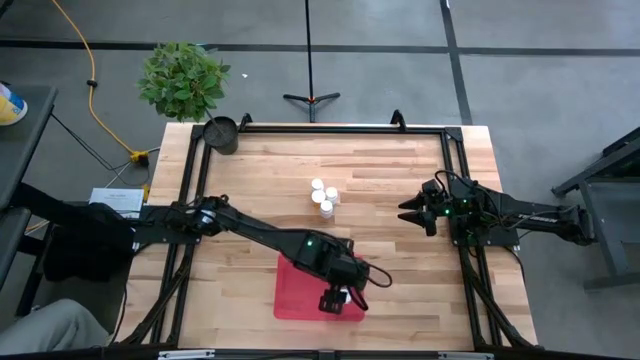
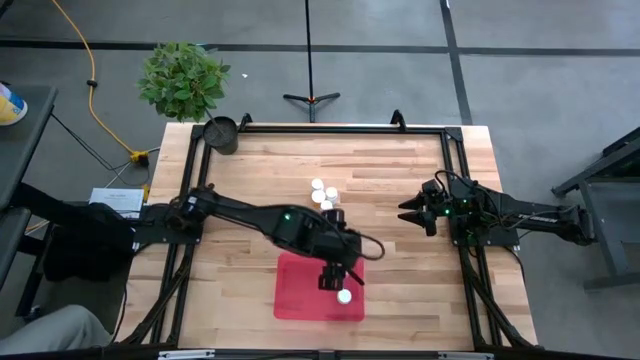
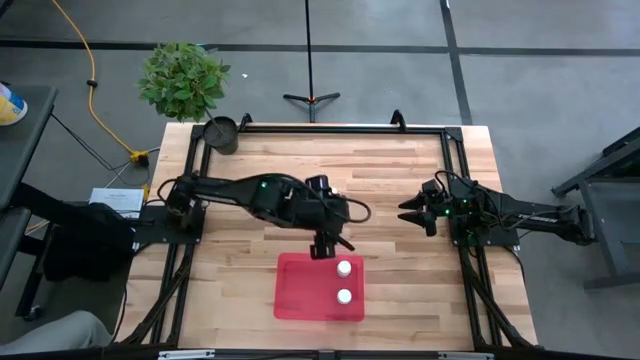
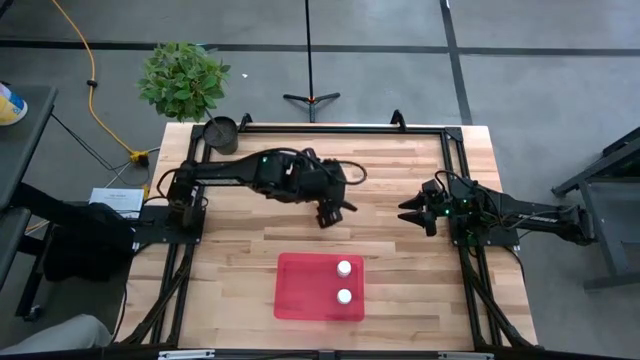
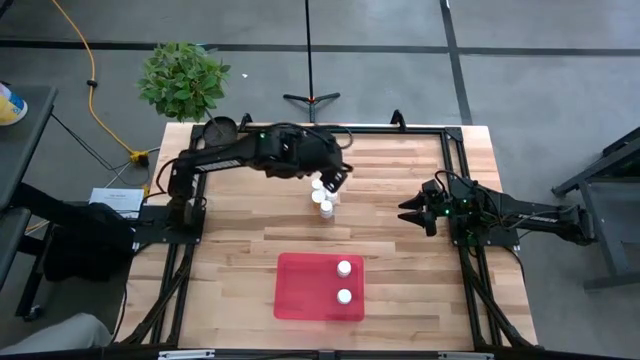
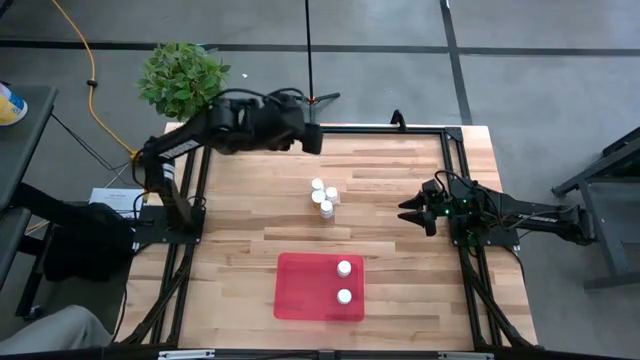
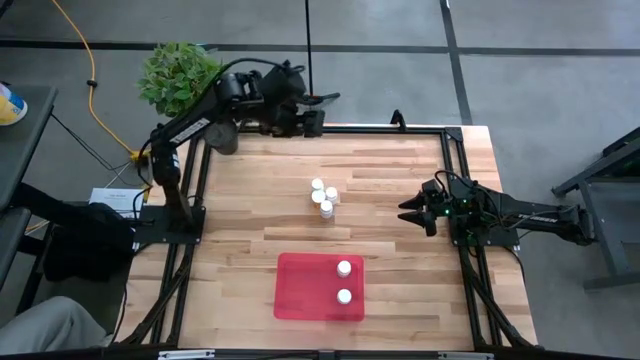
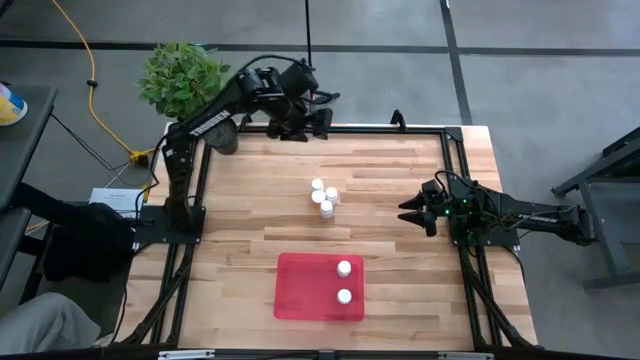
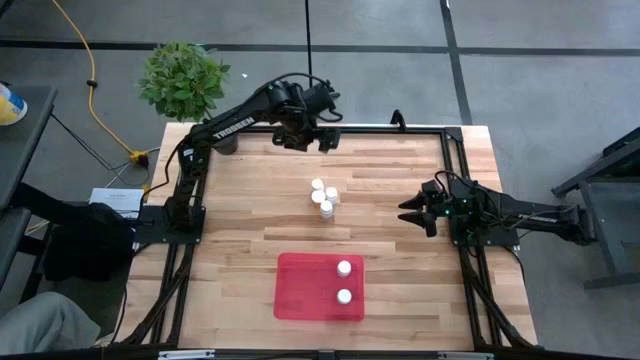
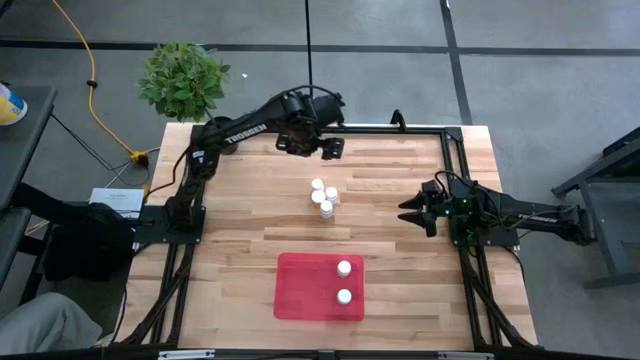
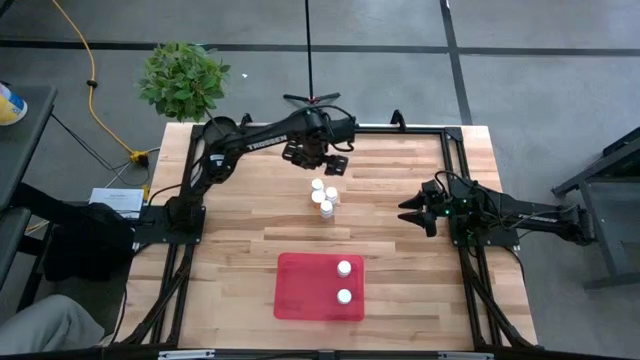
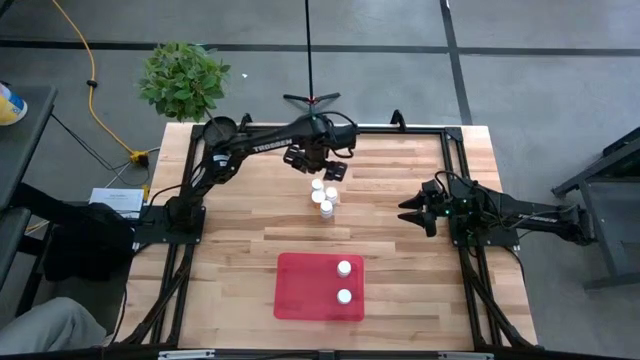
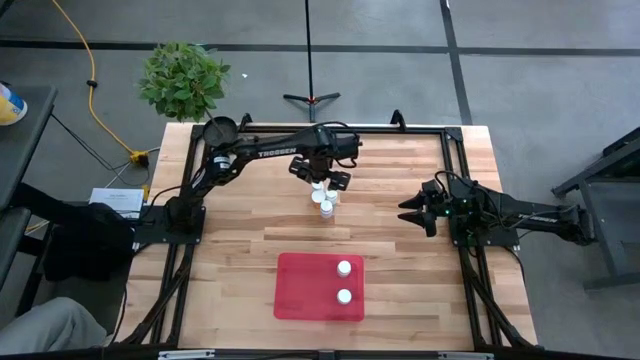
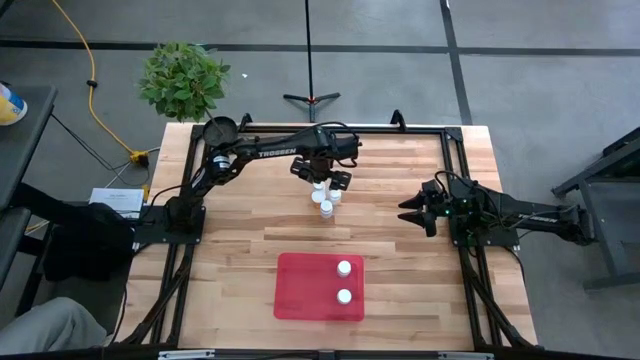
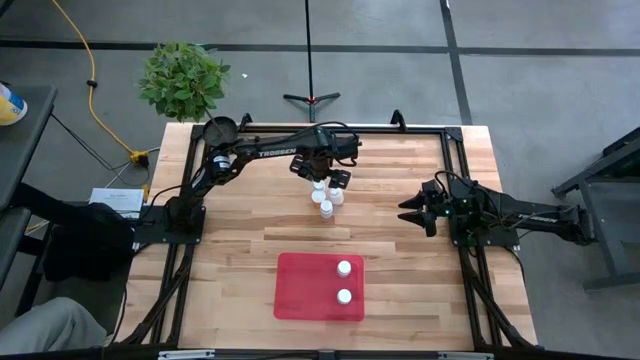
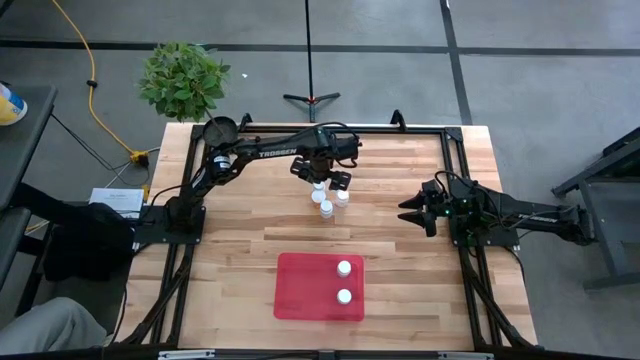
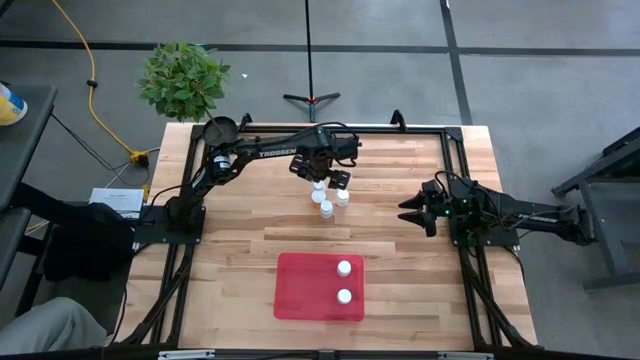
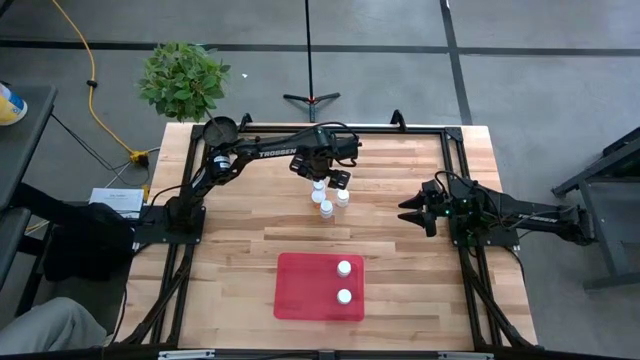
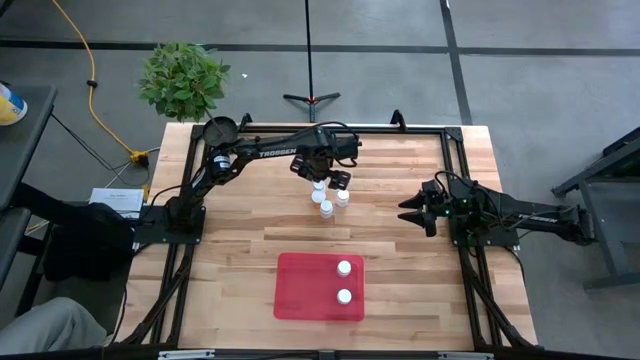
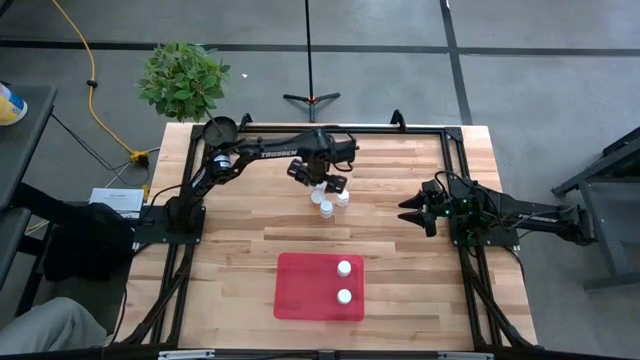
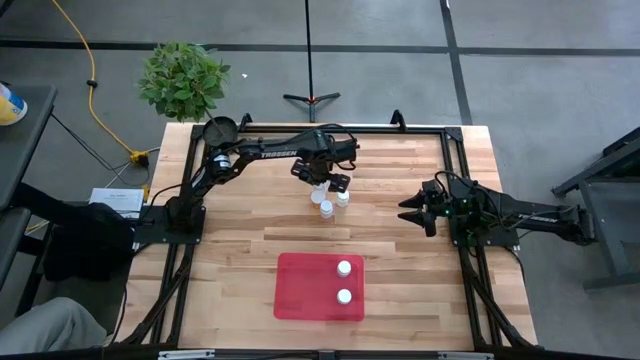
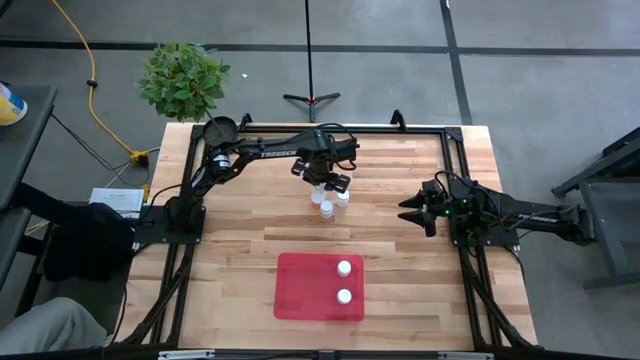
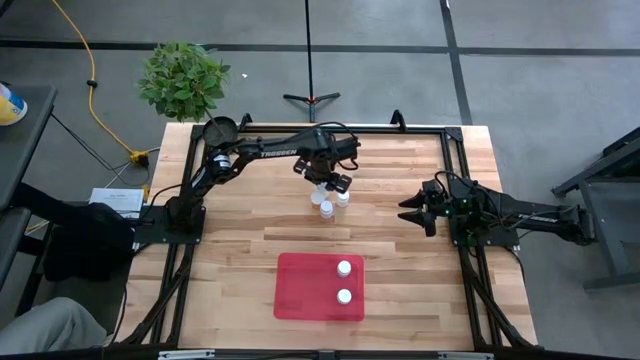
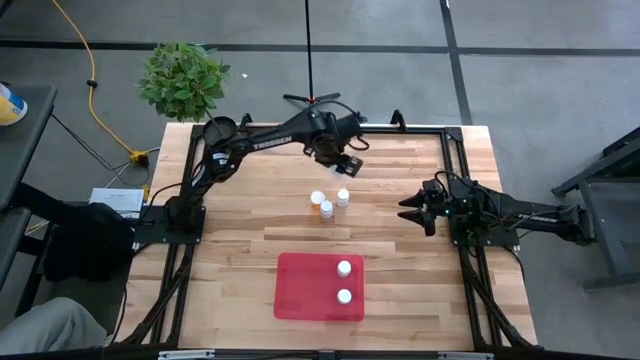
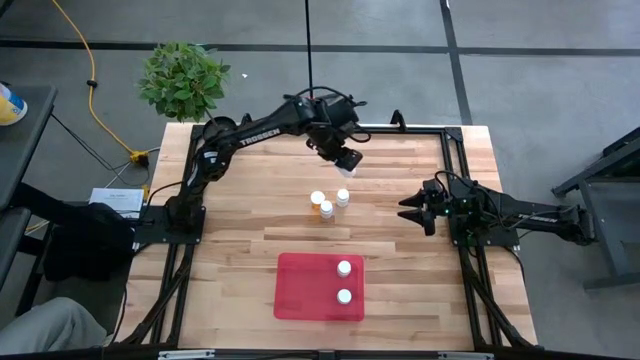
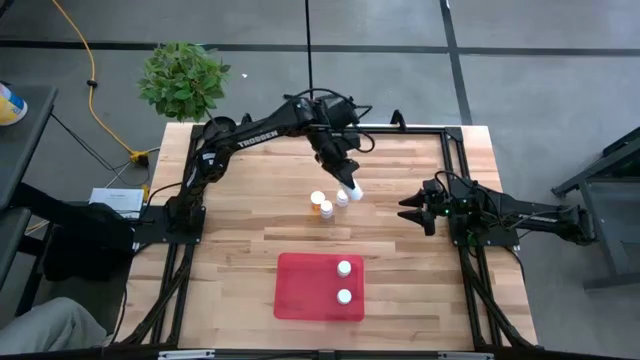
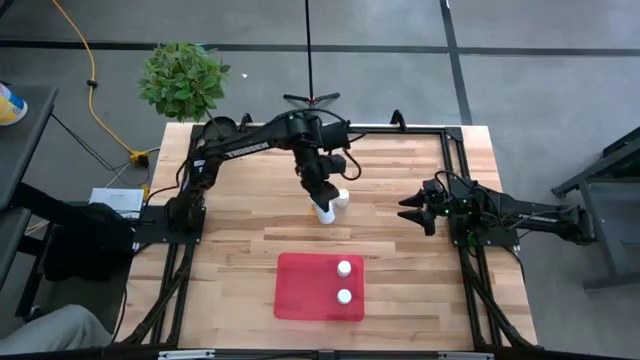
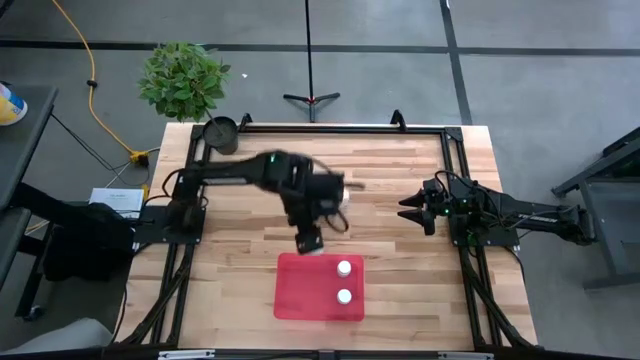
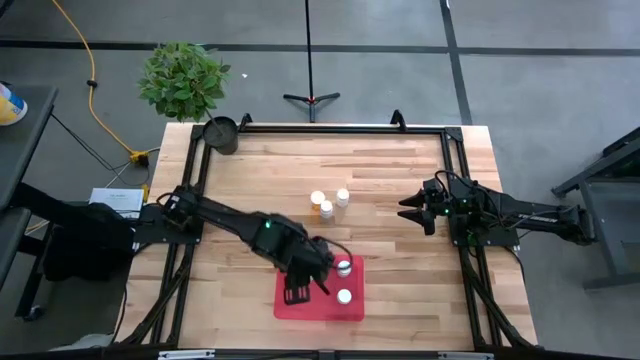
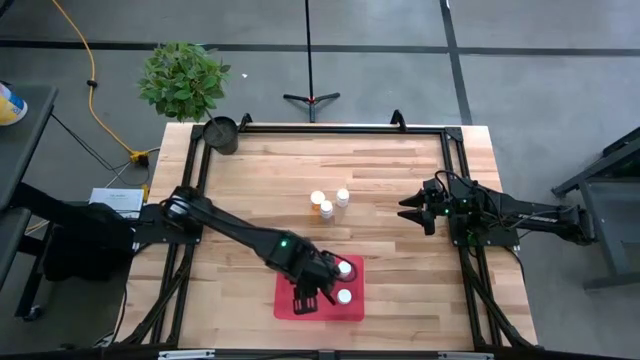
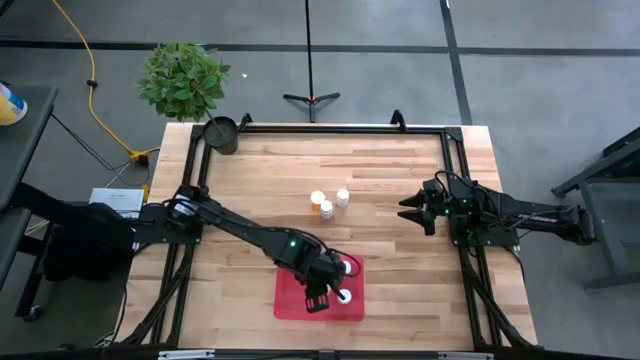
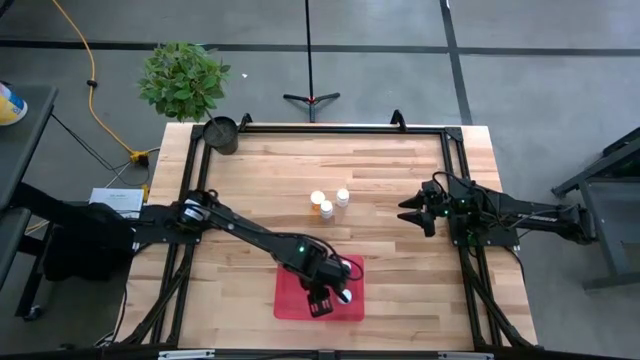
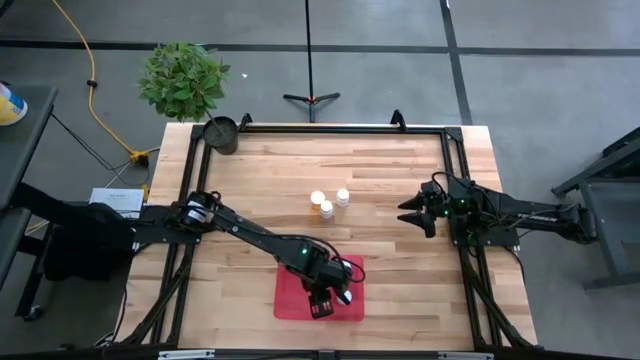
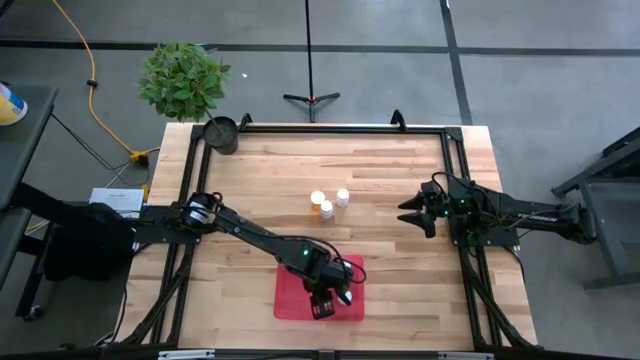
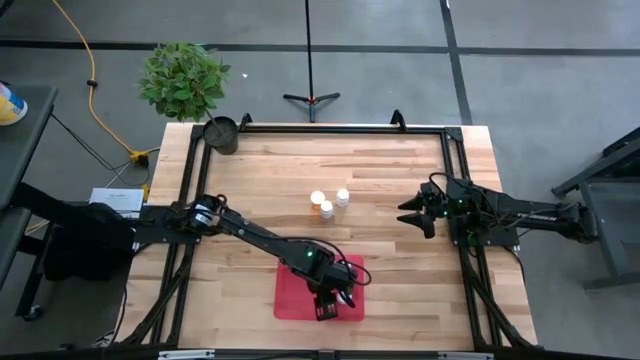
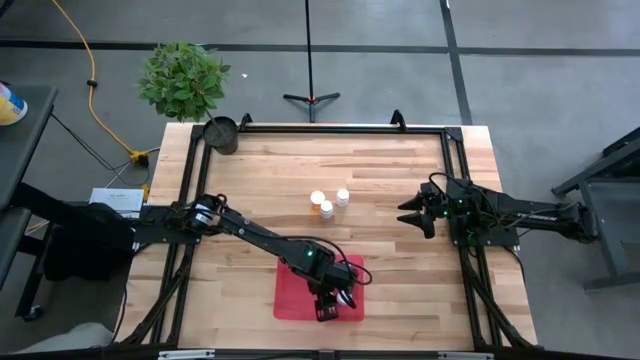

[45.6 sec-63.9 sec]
Task: Pick and place pill bottles into a basket
Put the top white pill bottle into the red bin

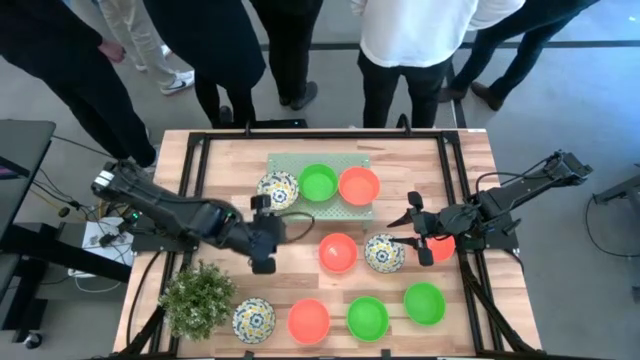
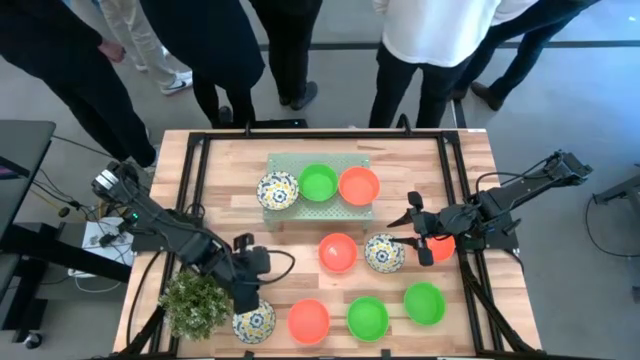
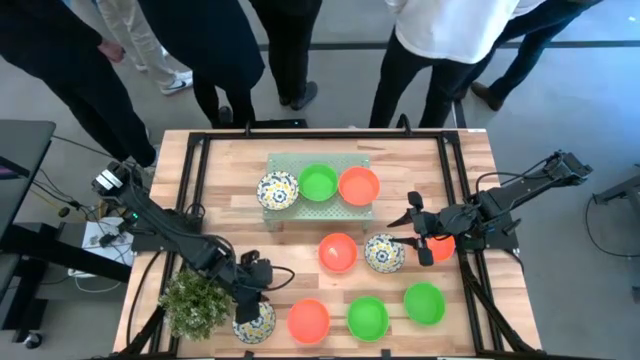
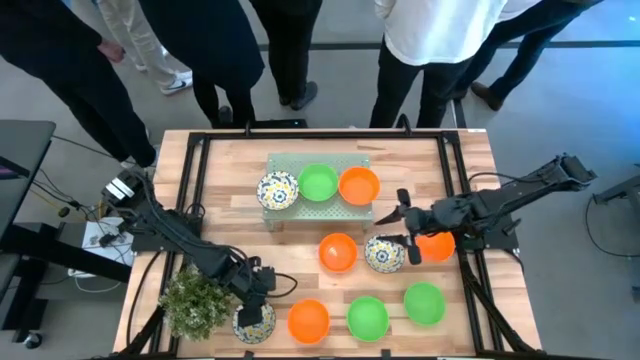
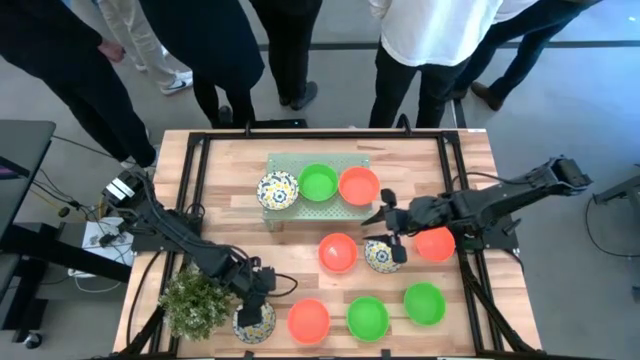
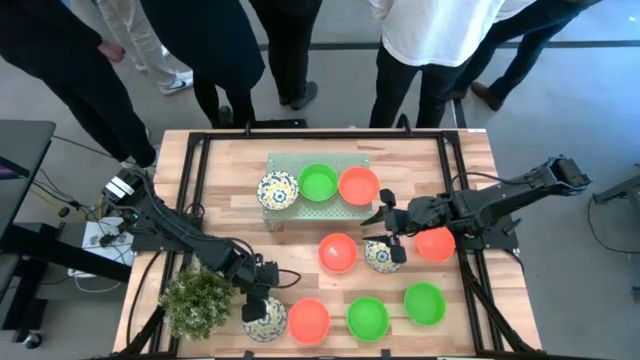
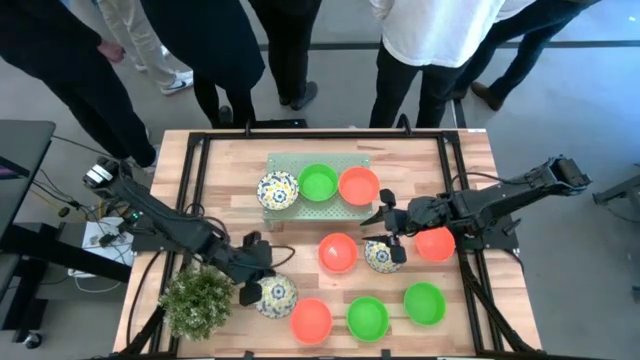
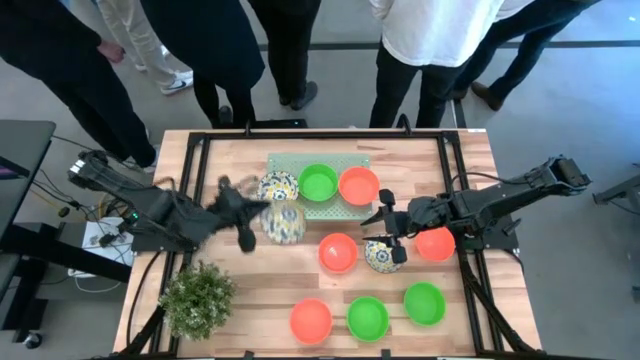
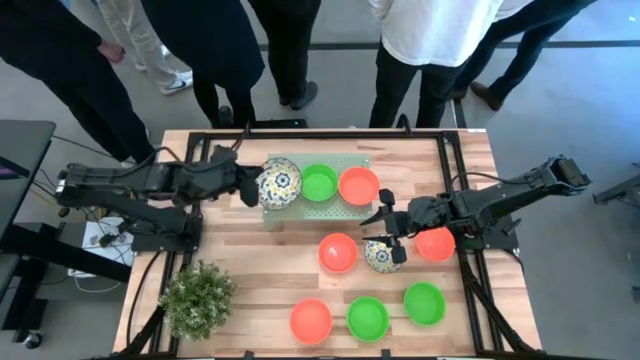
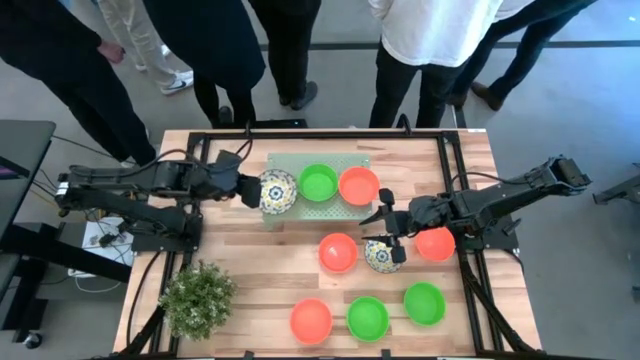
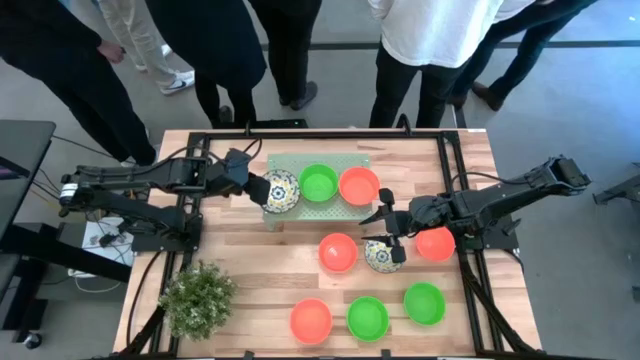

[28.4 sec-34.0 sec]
Task: Pick & Place Mini bowls
Stack the white patterned bowl on top of the white patterned bowl on the shelf
